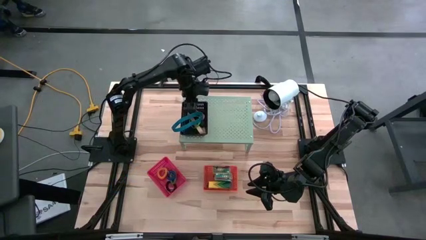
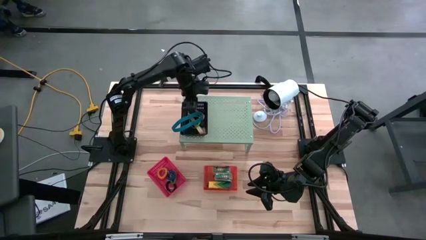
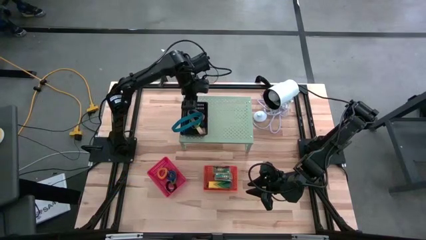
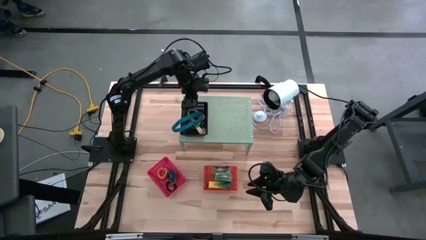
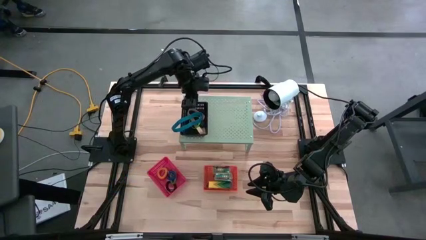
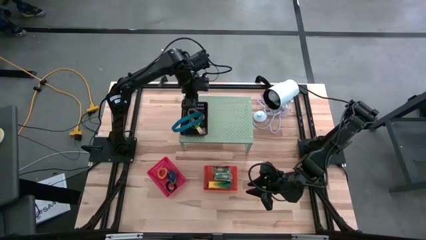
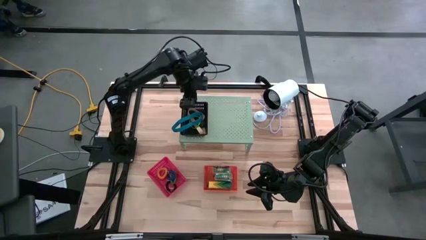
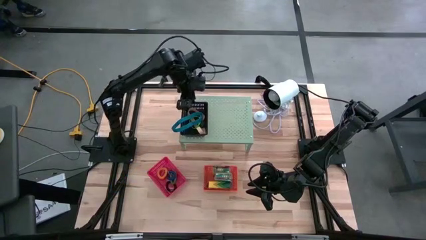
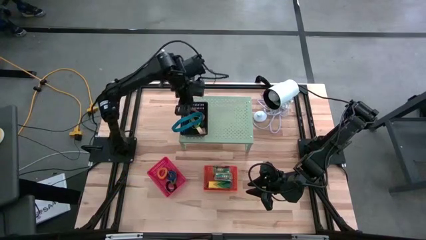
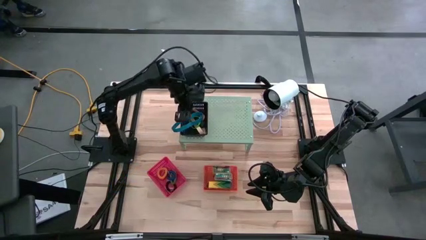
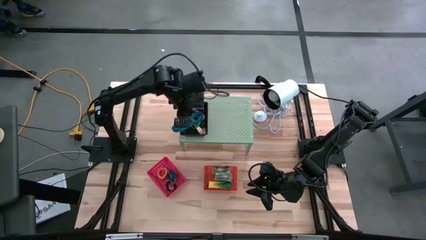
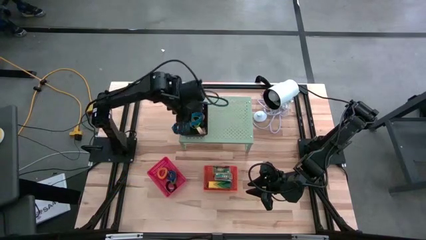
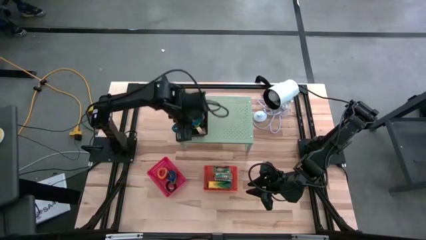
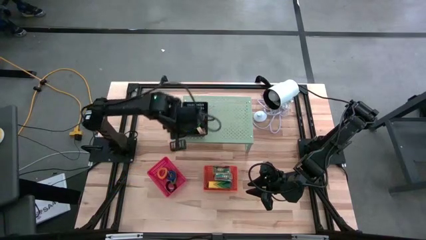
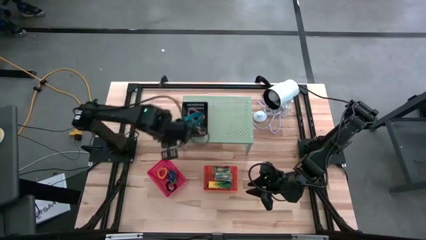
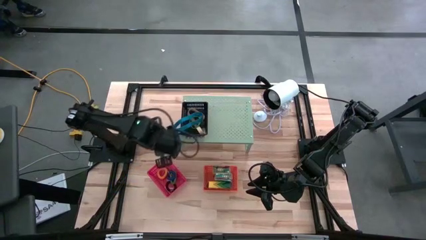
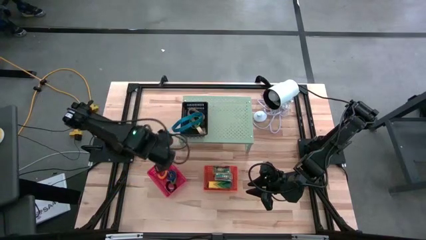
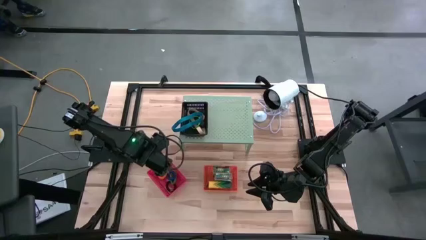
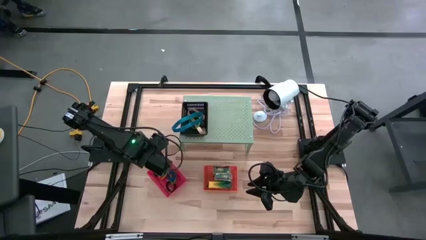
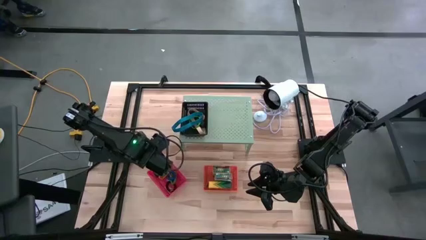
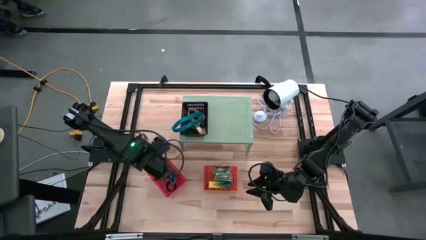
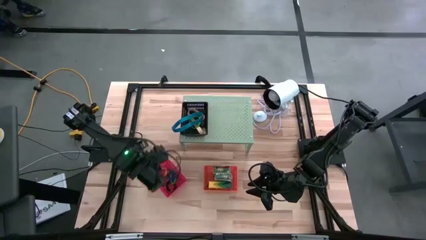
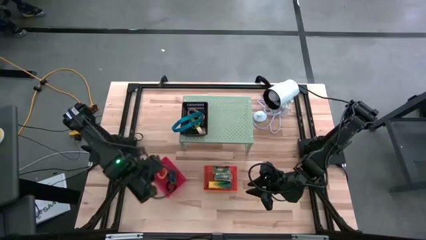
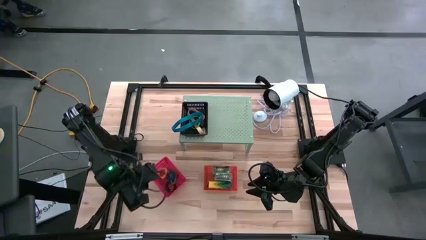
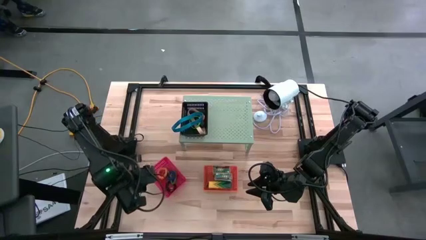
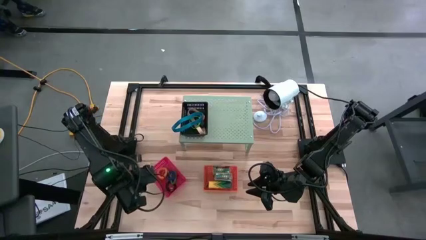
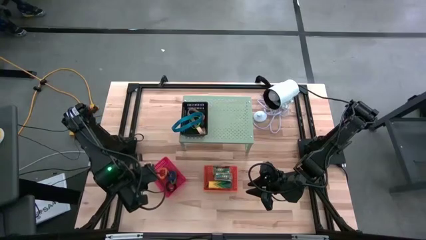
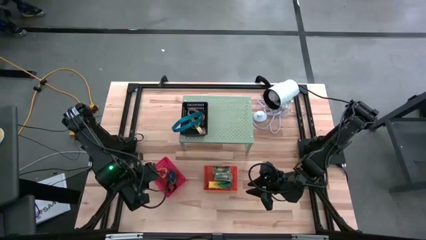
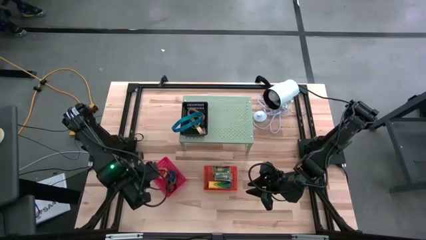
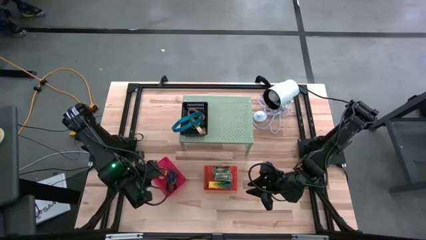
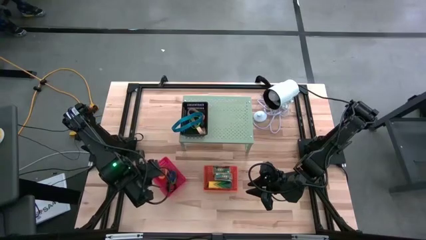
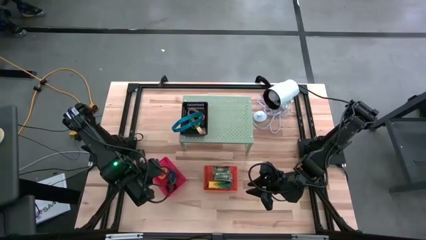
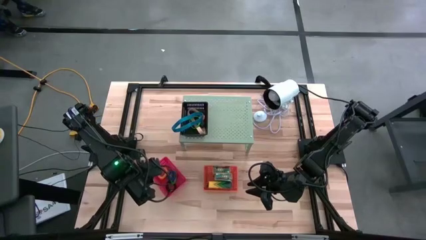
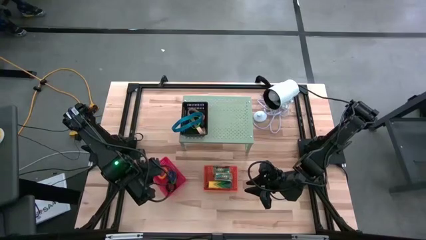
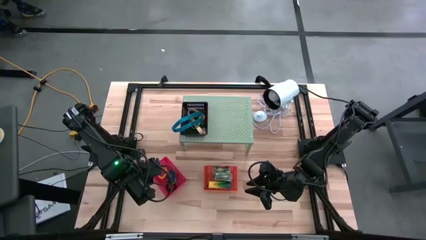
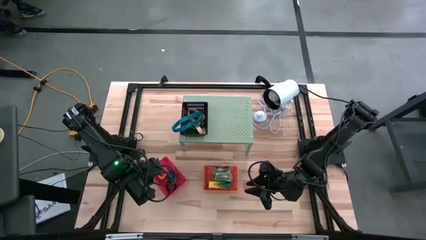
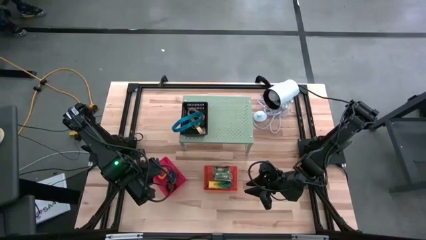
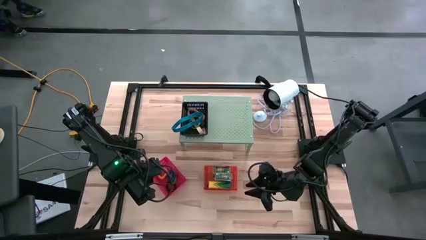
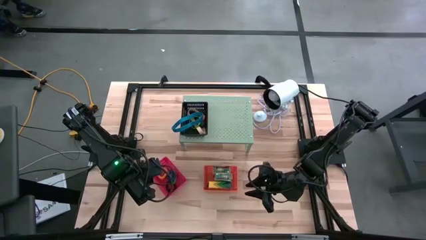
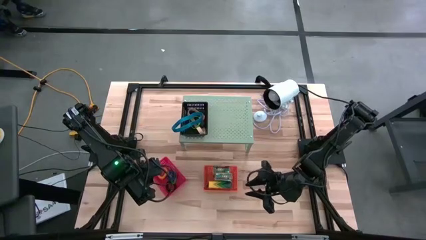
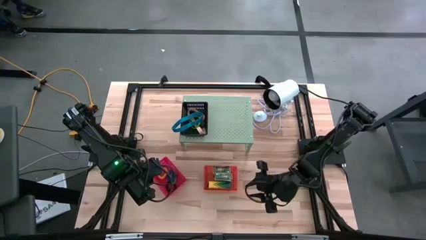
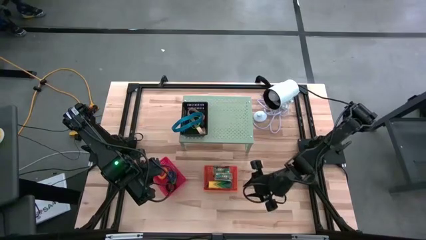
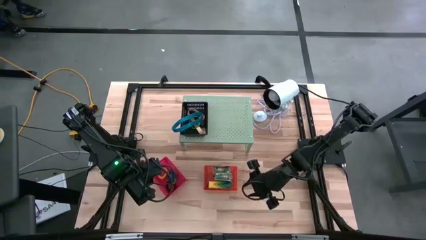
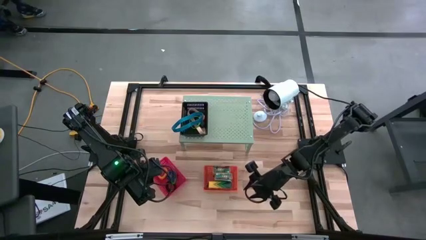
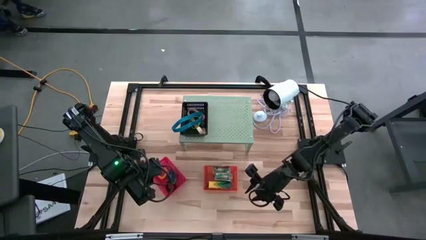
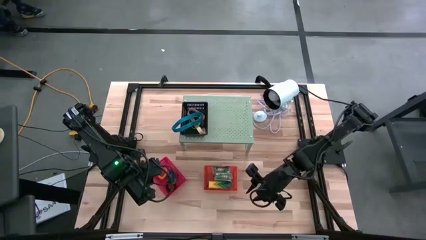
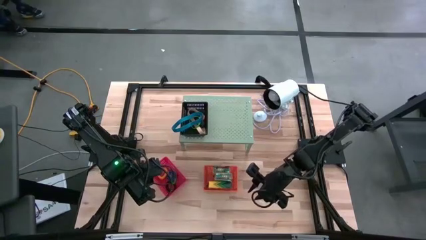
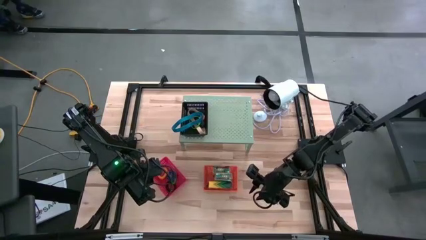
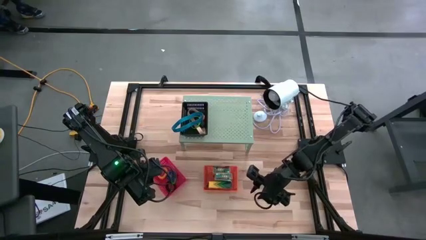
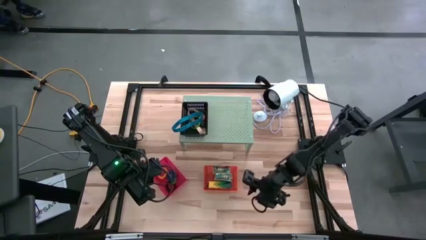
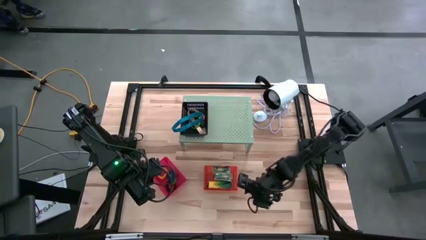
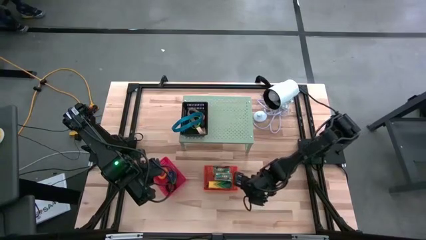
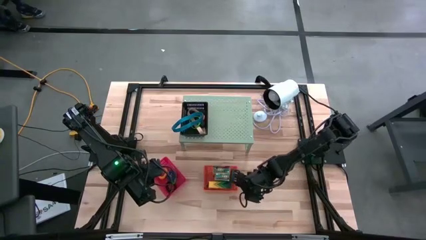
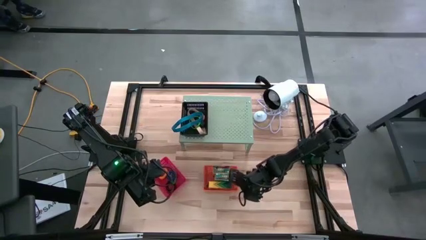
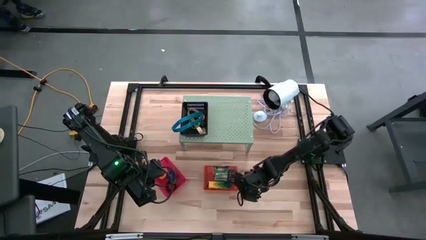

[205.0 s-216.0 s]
Task: Pick & Place Office Desk Supplies
Put the orange bin with crayon boxes on the shelf

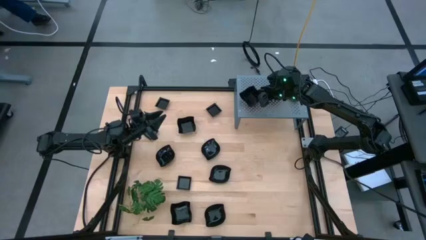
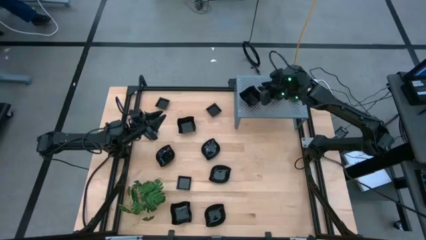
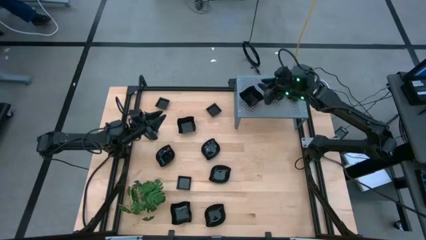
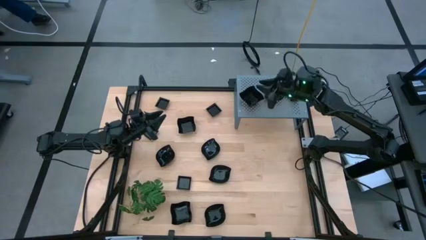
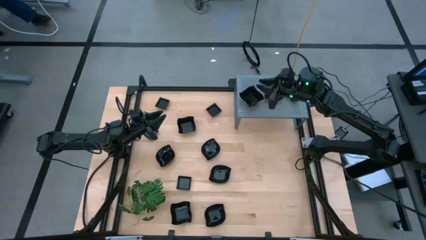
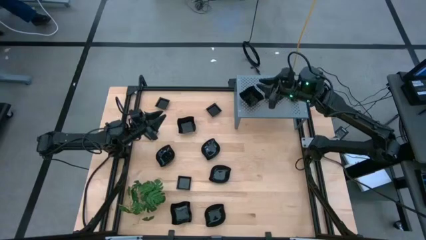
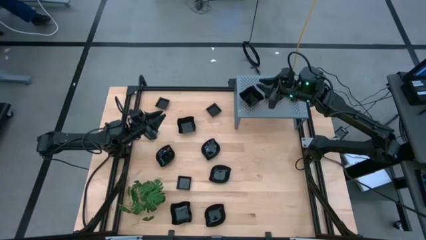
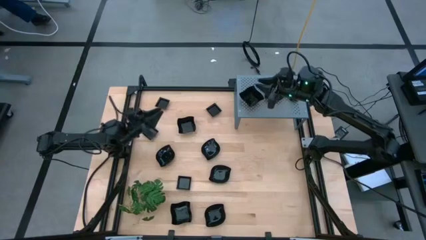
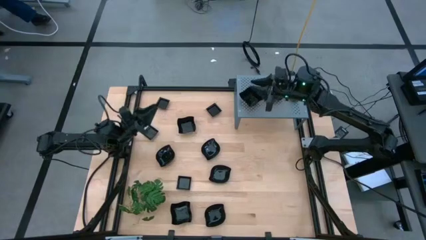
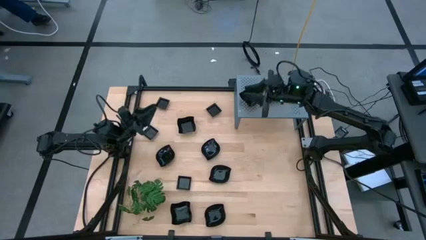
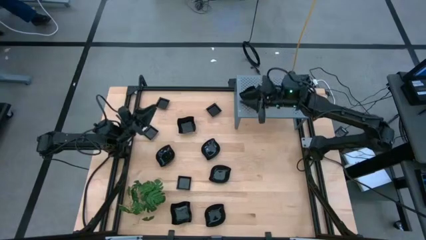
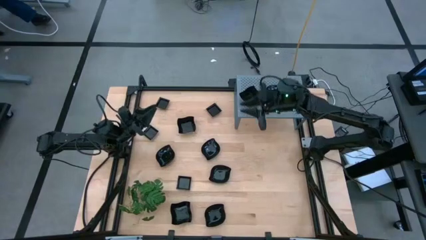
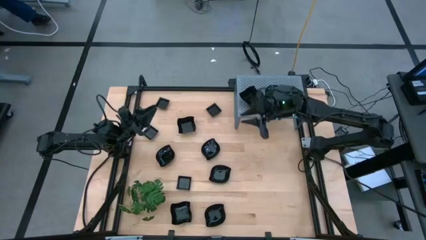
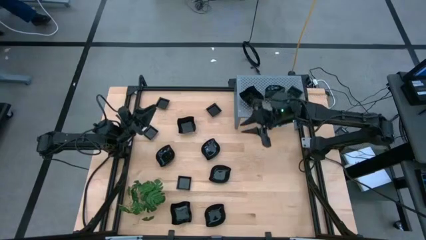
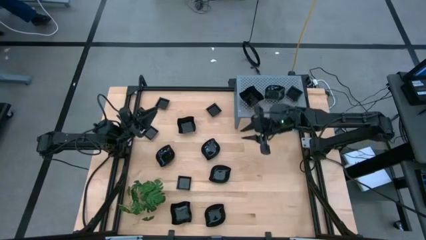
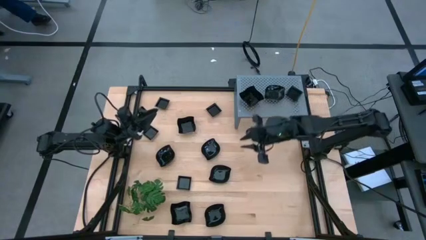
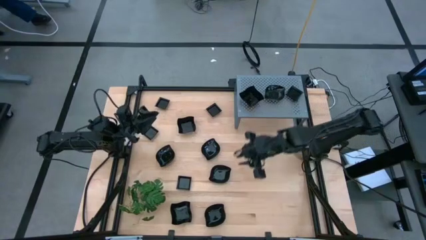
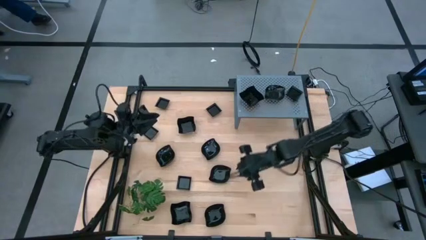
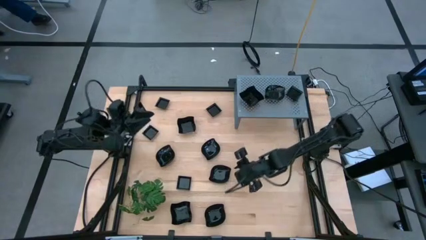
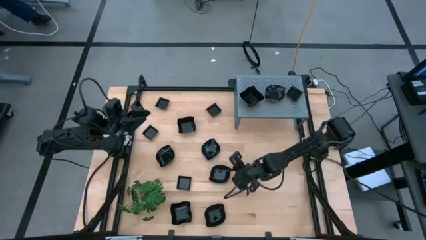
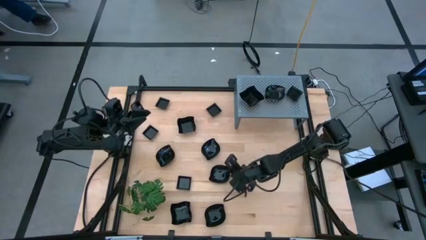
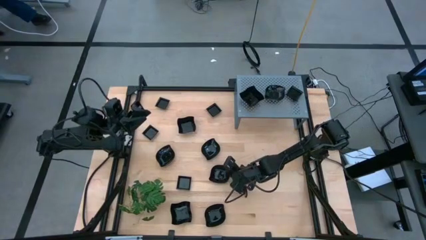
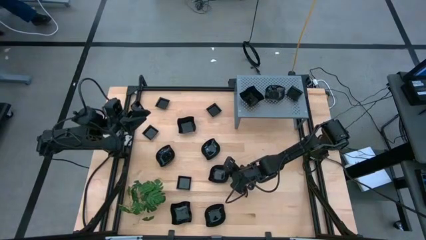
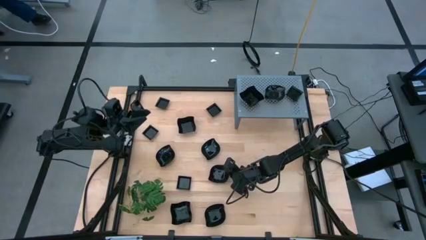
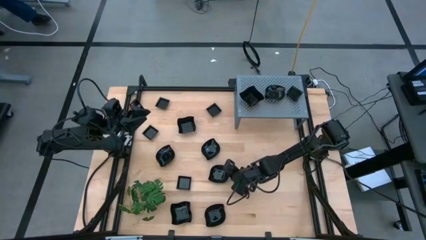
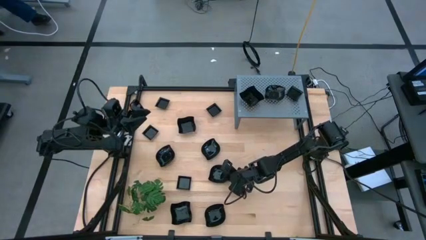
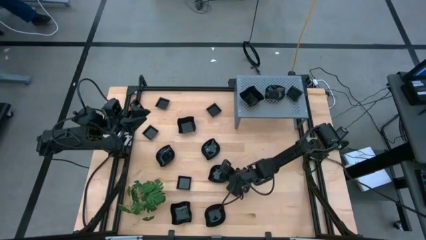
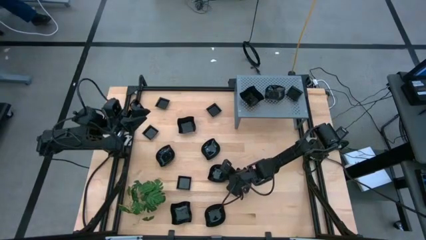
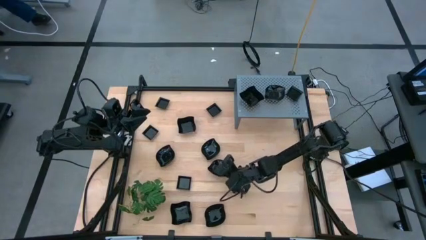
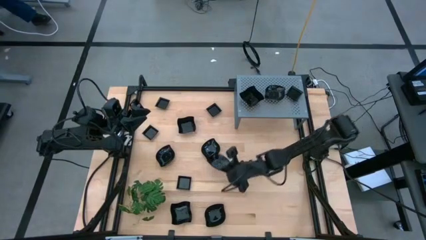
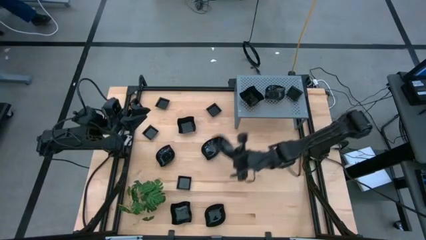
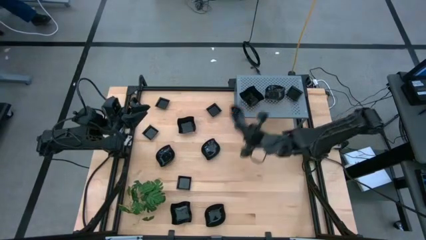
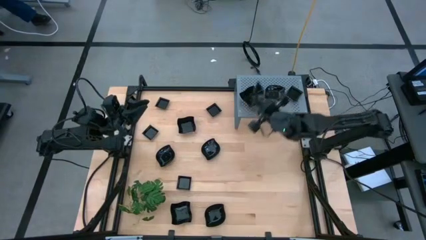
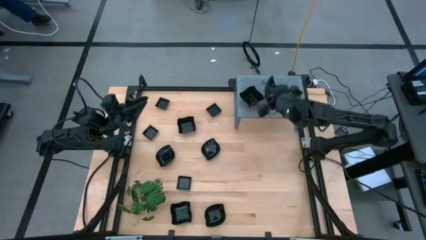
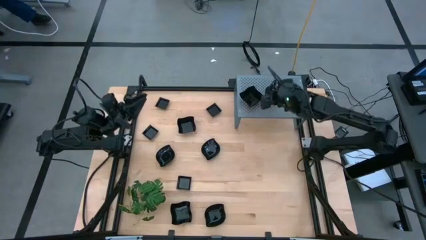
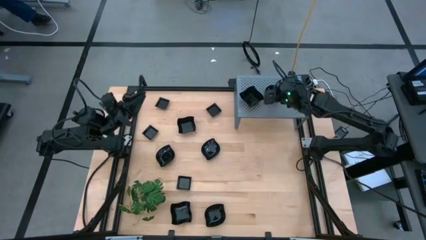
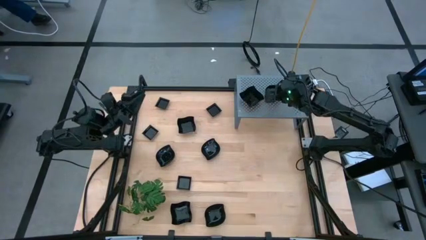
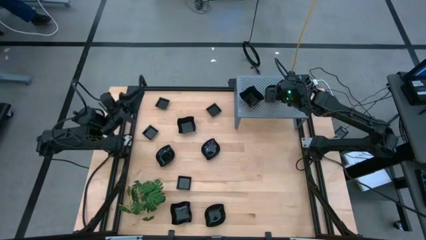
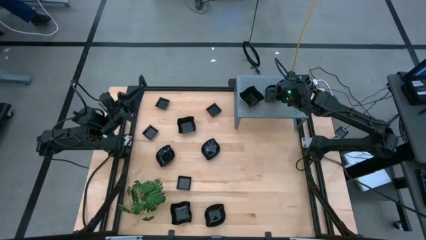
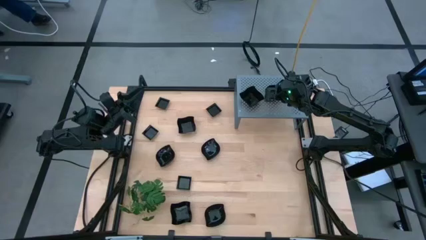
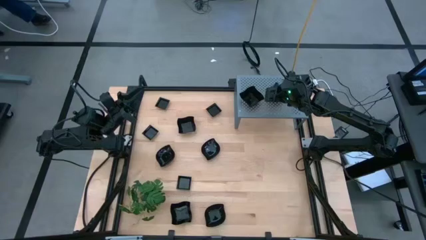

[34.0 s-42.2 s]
Task: Pick & Place Mini shaped plates
Stack the black leaf-shaped plate on top of the black leaf-shaped plate on the shelf
